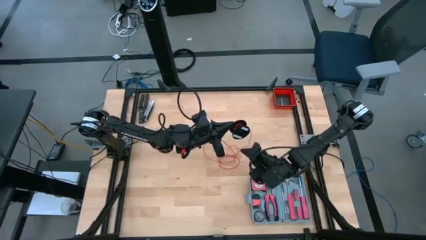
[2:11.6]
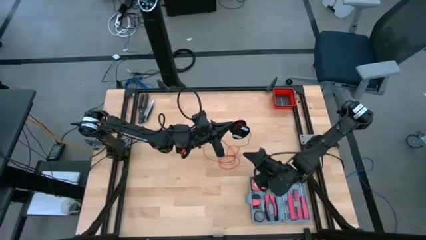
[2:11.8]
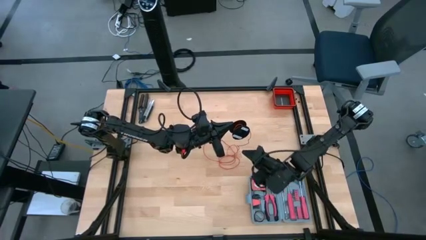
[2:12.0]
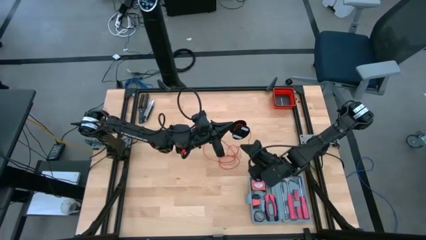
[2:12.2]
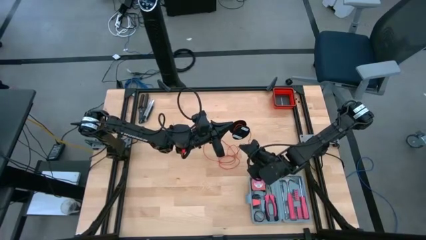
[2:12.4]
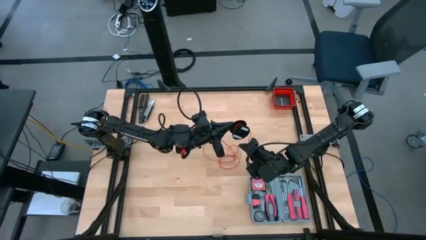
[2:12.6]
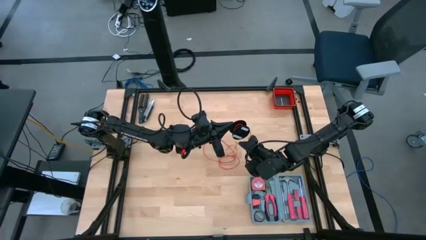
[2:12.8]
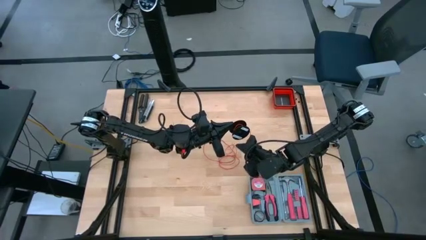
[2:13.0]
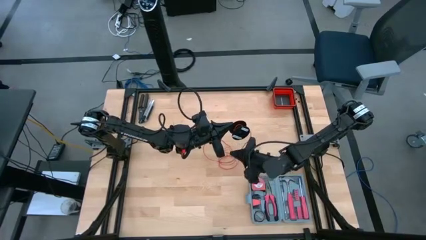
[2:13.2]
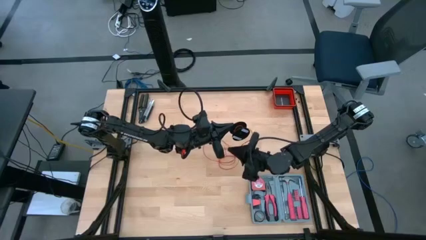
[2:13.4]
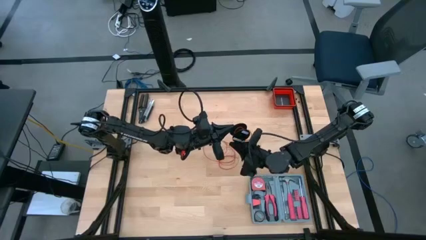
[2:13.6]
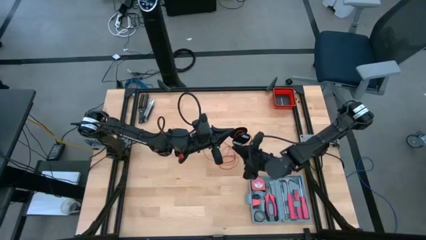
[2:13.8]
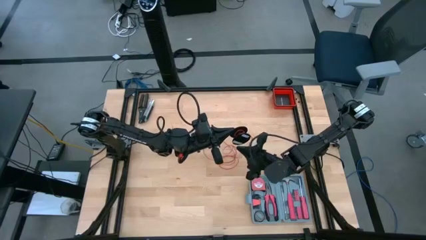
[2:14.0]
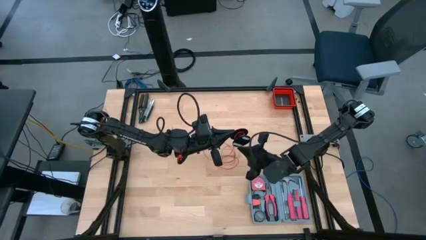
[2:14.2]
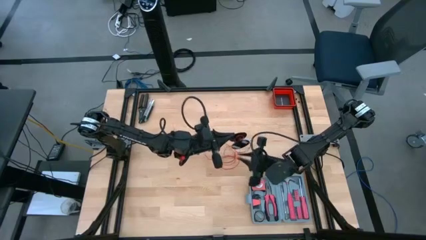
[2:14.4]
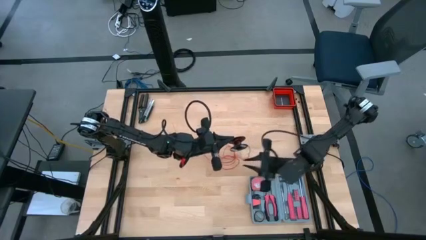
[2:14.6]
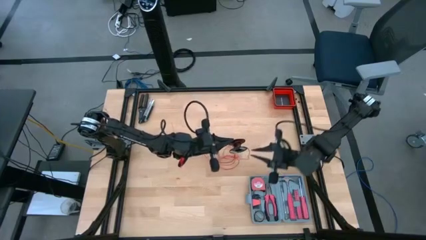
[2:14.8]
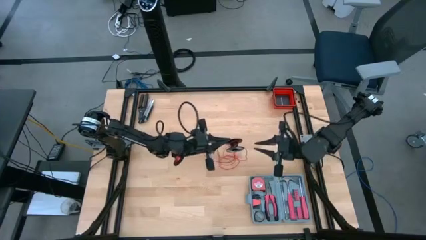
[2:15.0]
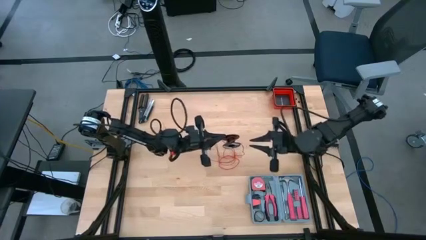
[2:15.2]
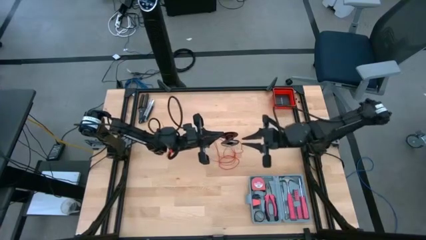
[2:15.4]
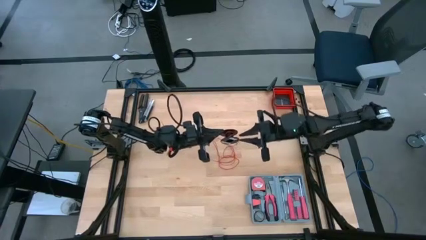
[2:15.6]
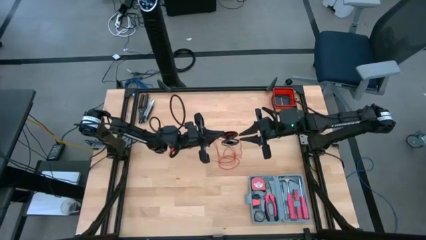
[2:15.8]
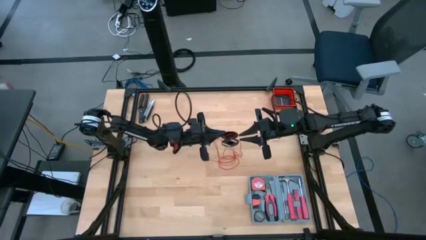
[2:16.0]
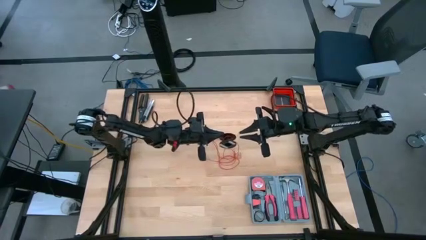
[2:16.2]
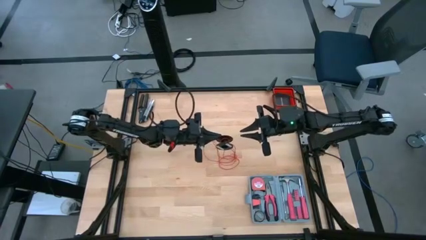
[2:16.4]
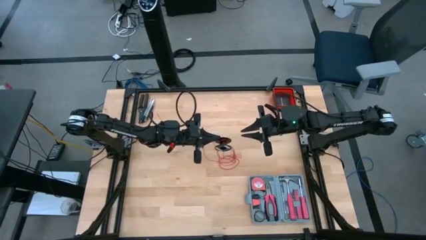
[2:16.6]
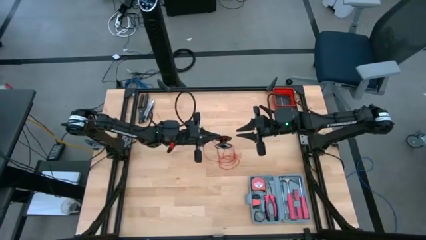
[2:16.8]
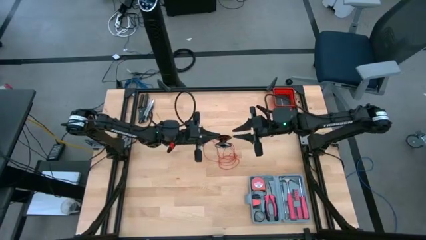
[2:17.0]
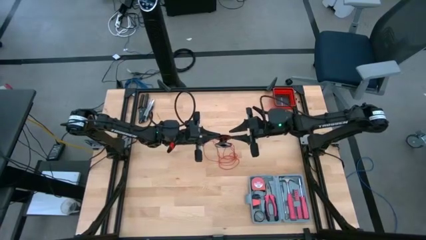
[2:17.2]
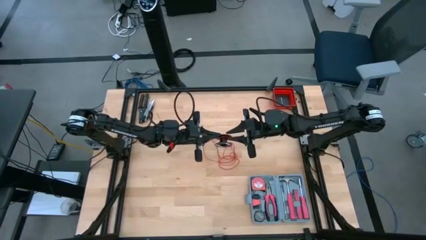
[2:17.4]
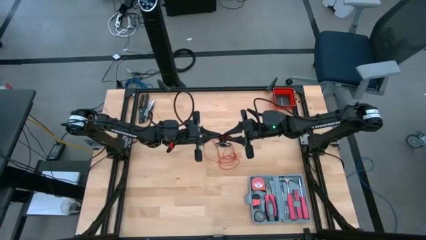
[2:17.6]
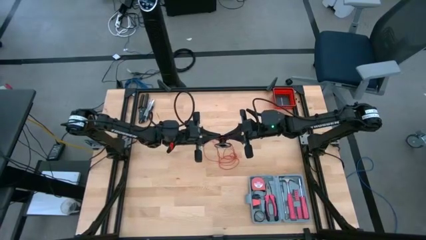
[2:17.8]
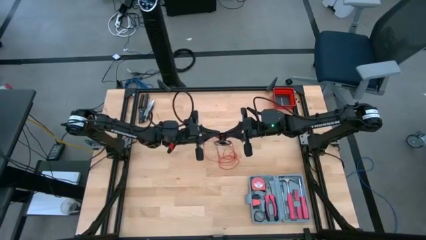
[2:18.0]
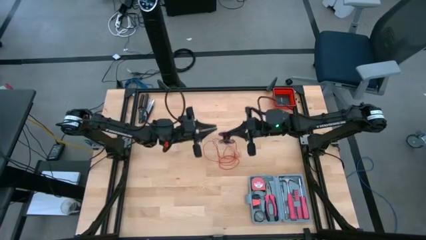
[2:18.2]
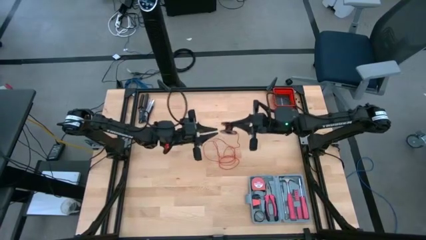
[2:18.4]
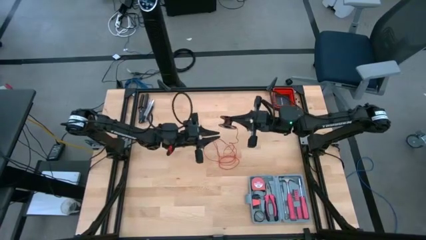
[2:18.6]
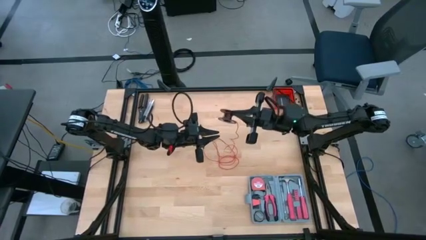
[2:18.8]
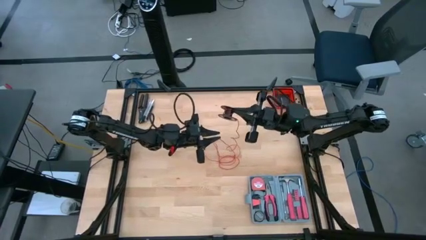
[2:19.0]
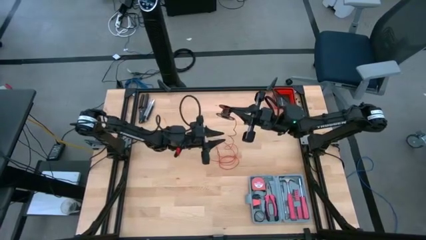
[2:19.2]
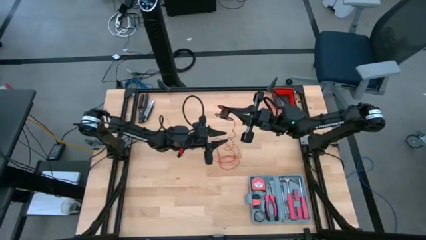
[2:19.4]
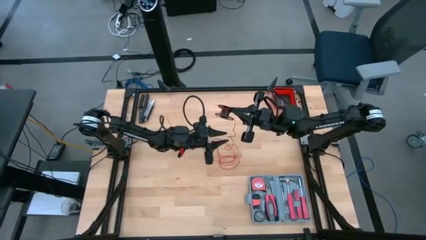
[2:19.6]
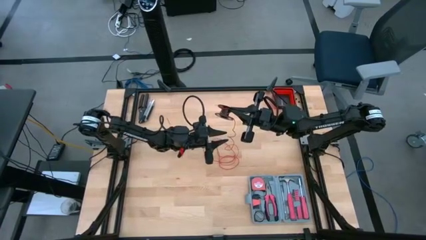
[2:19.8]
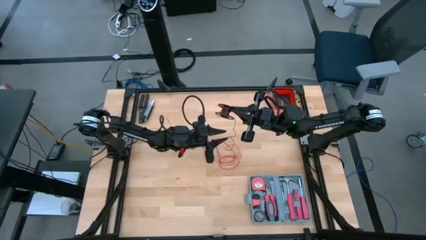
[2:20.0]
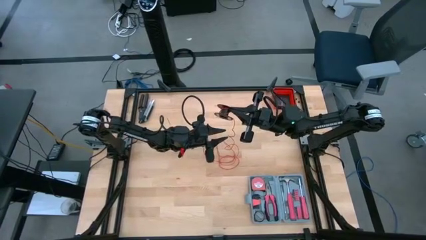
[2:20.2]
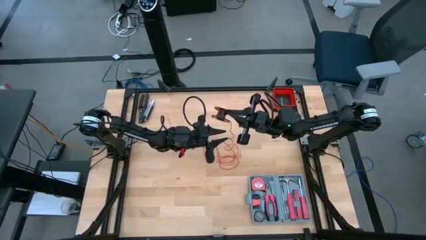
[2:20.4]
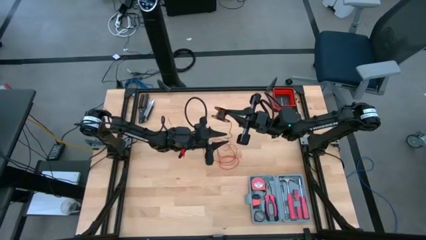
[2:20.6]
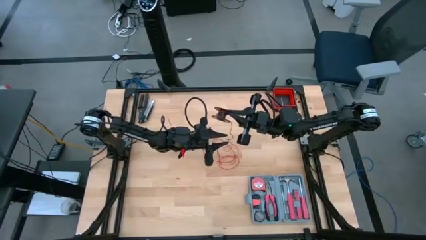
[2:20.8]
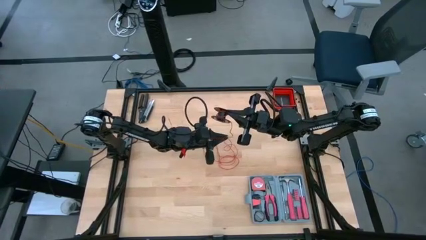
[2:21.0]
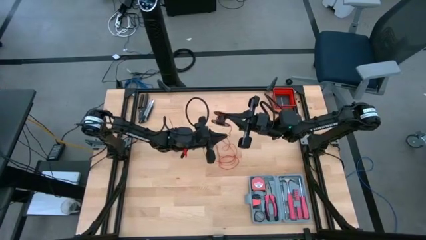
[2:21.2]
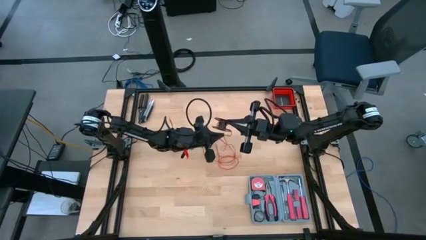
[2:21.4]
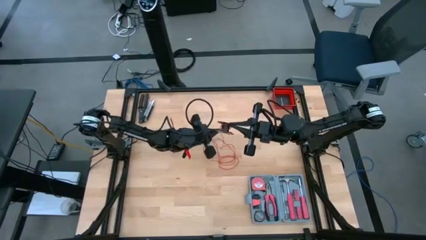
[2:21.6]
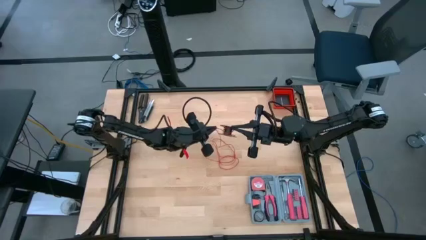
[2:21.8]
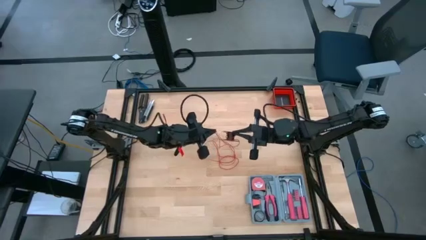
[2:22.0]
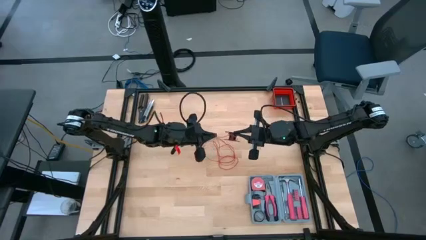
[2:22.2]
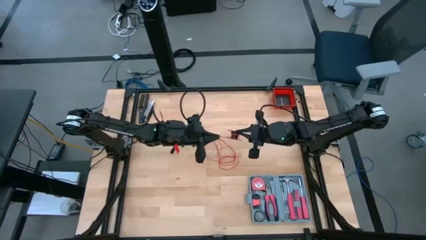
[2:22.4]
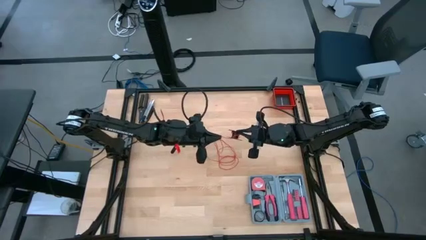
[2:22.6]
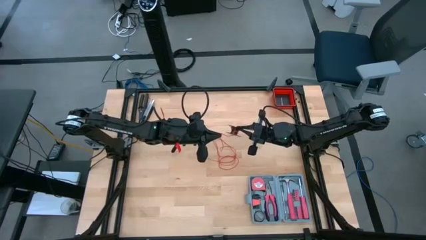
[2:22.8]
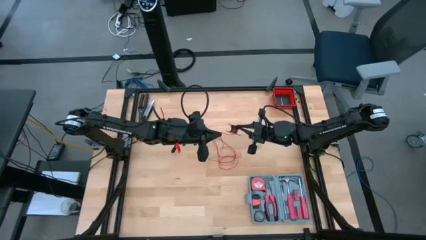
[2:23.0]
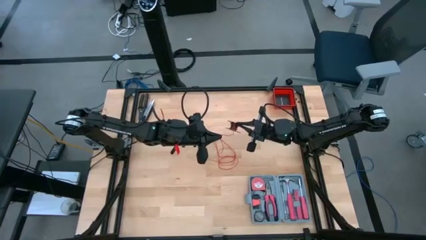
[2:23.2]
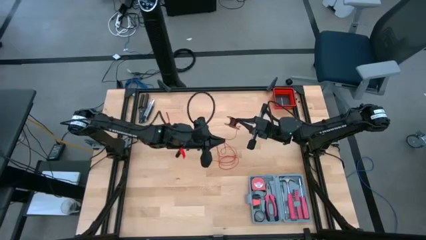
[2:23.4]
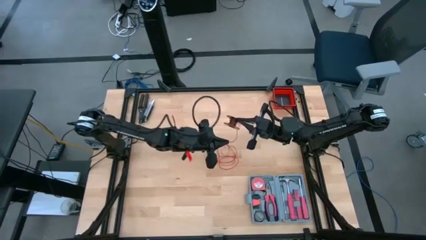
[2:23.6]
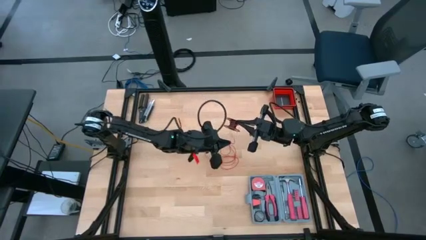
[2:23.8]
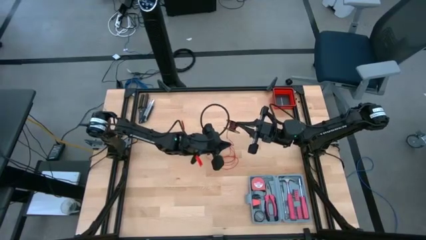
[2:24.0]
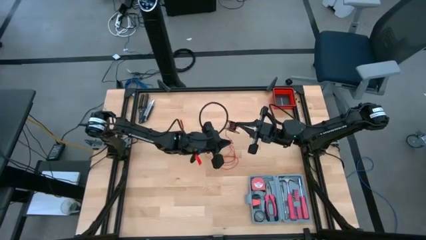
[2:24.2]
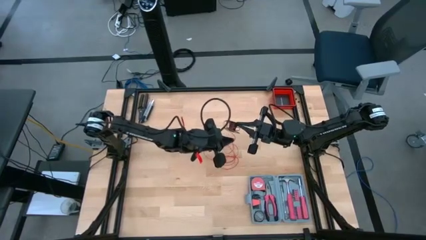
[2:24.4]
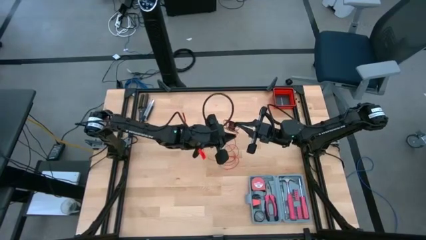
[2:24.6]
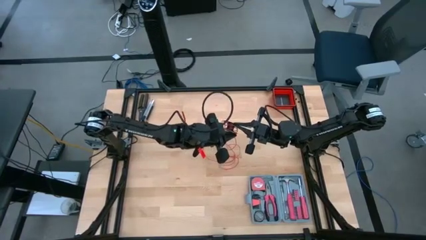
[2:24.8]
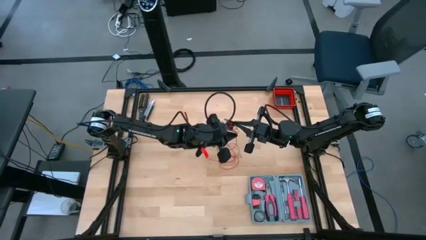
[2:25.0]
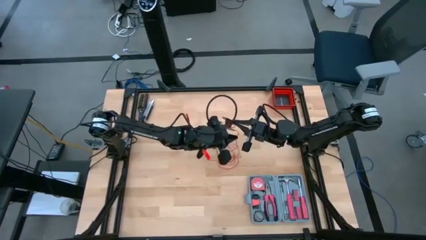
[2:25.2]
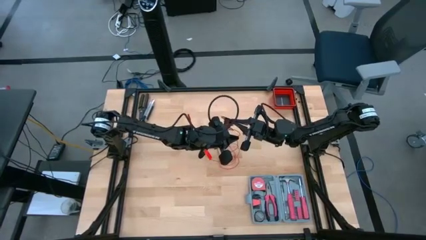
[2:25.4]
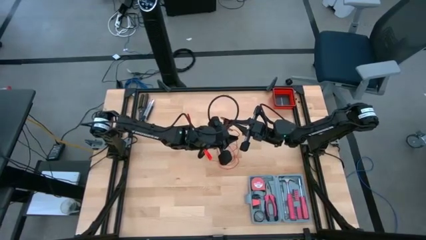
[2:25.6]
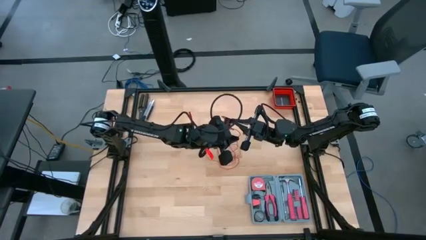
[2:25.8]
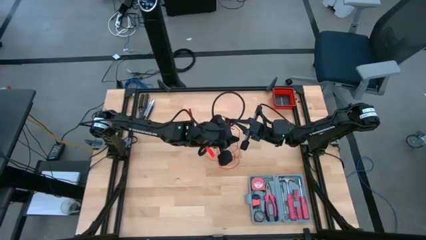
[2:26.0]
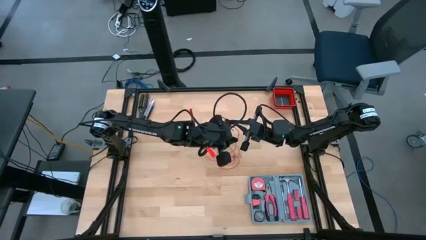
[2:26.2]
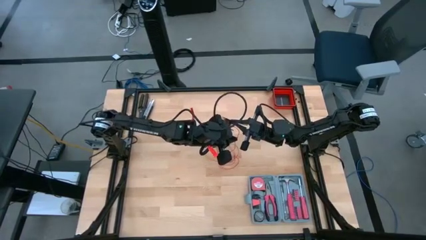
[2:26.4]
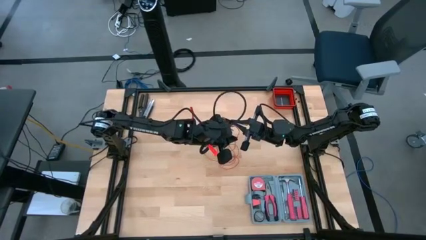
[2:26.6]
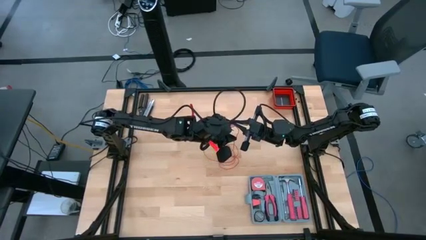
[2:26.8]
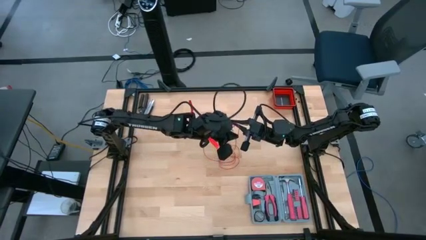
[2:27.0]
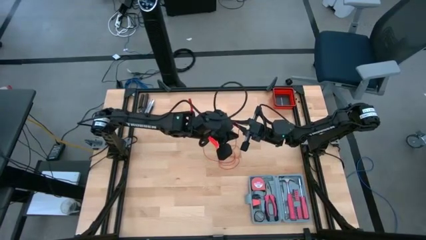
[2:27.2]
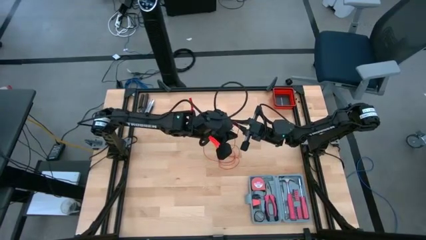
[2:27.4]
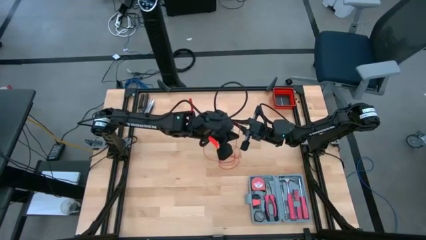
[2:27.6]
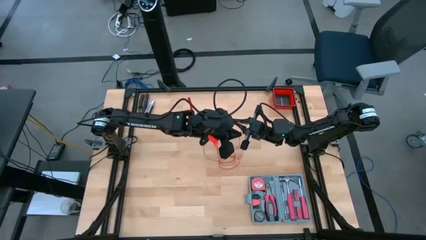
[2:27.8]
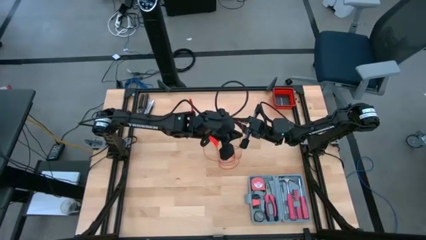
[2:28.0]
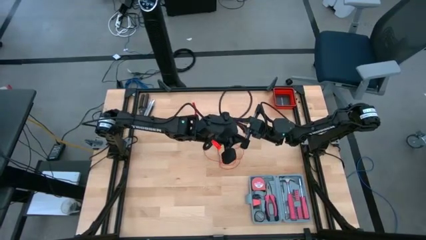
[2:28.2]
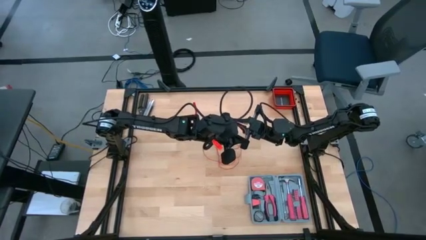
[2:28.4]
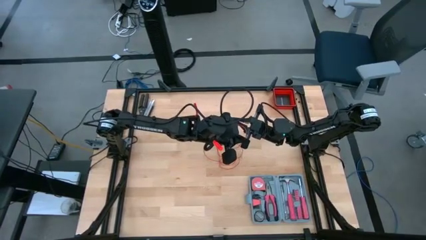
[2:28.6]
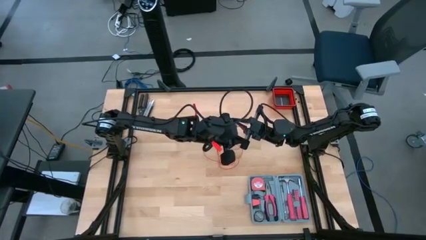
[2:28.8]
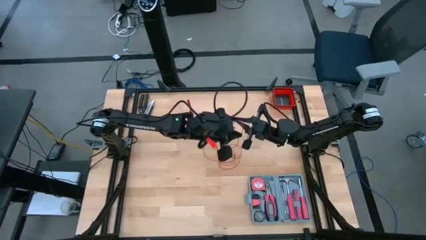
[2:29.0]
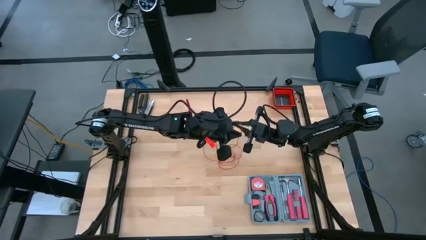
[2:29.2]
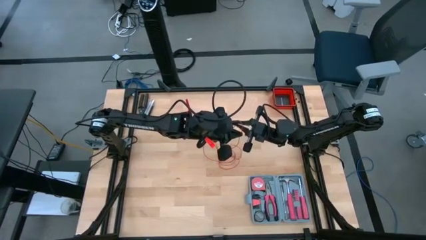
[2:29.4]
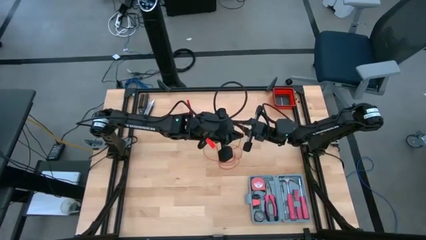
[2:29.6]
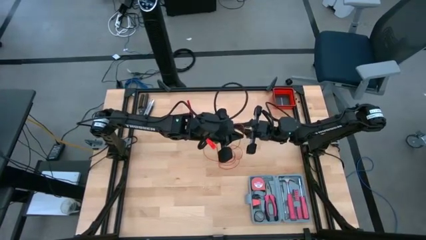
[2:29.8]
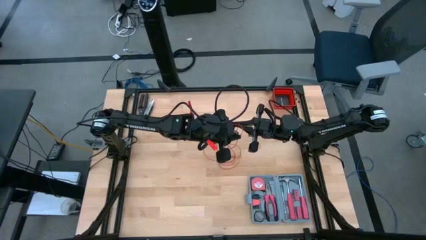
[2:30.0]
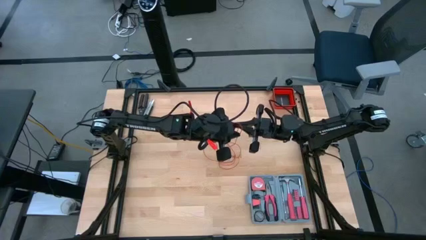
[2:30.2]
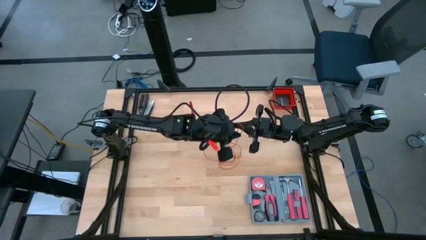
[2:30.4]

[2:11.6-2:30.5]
Task: Coil cords
Coil the wire
